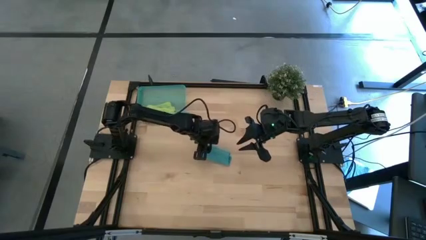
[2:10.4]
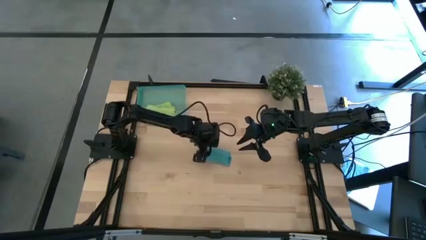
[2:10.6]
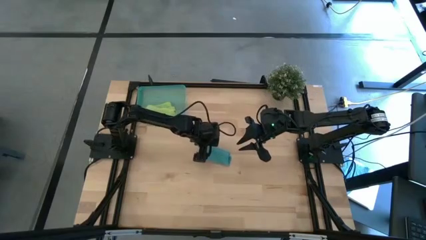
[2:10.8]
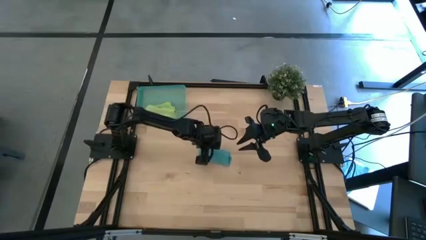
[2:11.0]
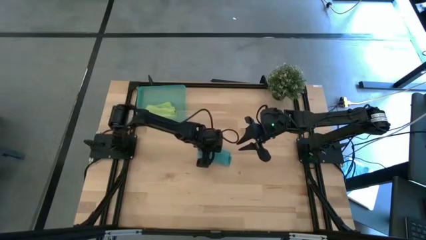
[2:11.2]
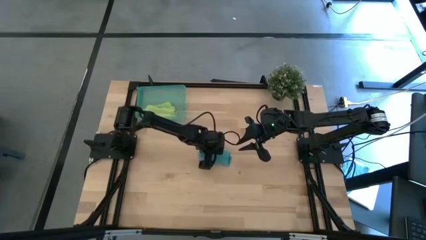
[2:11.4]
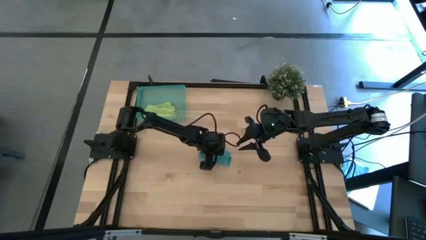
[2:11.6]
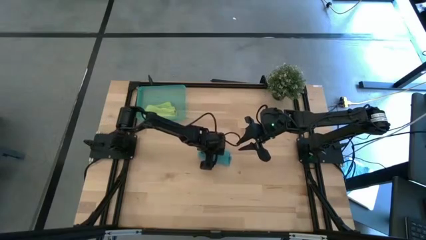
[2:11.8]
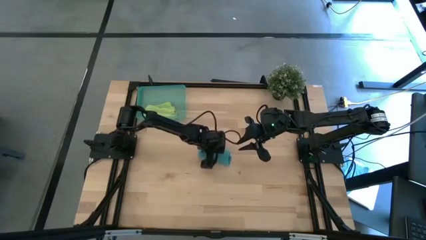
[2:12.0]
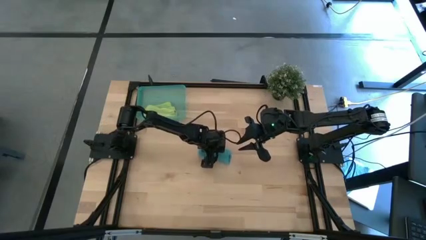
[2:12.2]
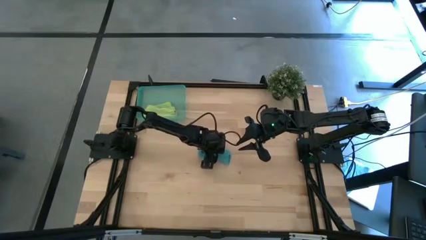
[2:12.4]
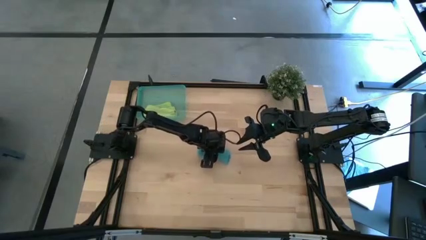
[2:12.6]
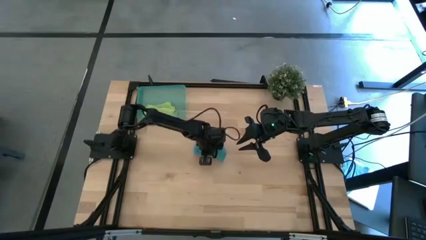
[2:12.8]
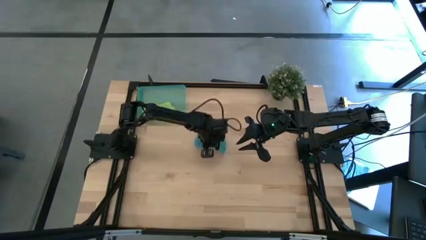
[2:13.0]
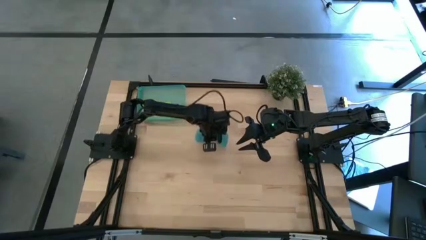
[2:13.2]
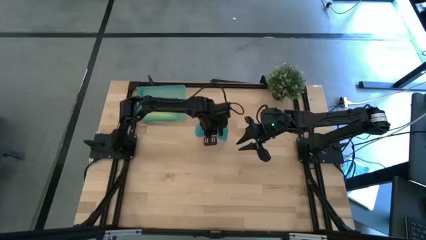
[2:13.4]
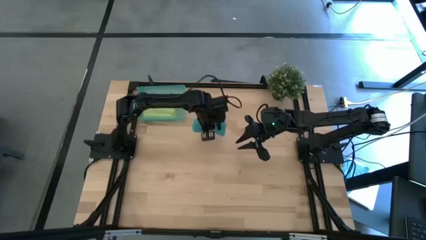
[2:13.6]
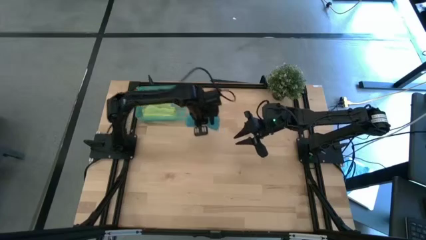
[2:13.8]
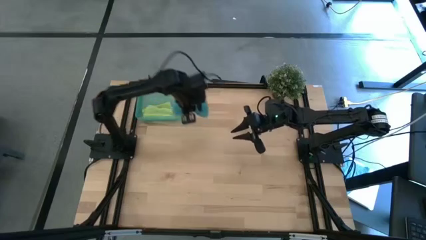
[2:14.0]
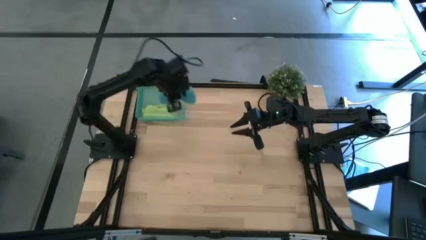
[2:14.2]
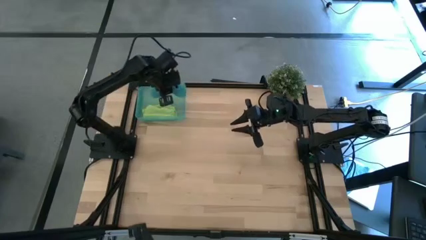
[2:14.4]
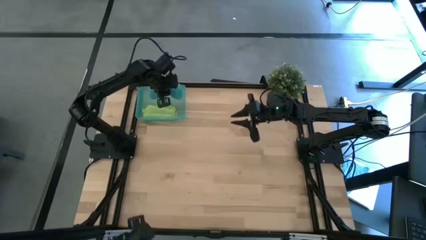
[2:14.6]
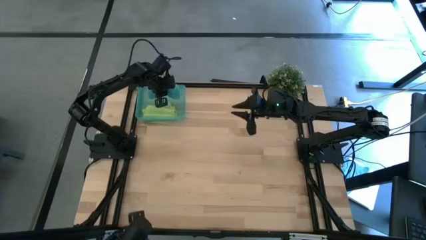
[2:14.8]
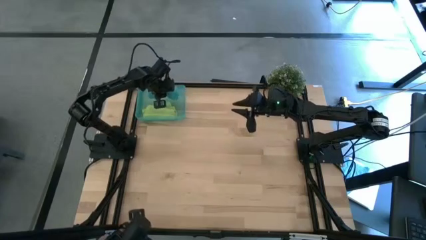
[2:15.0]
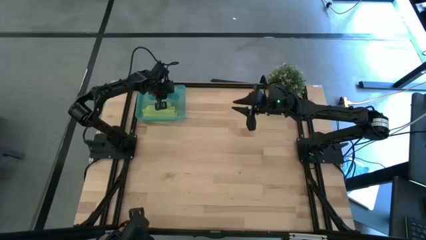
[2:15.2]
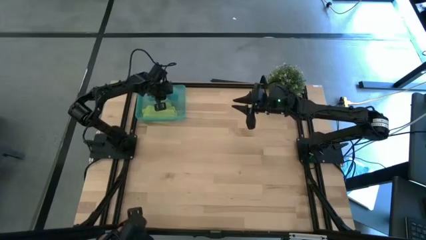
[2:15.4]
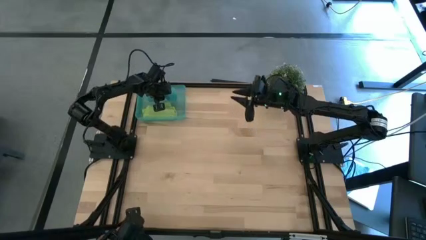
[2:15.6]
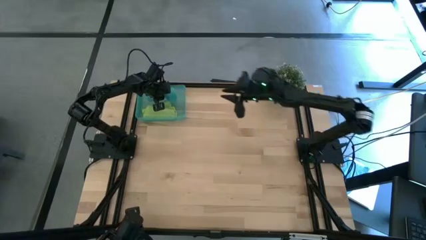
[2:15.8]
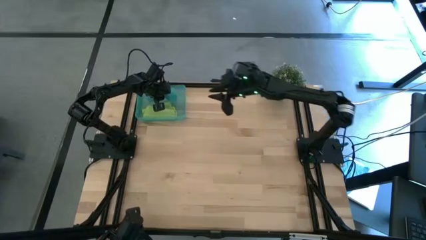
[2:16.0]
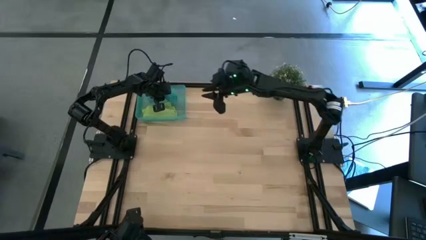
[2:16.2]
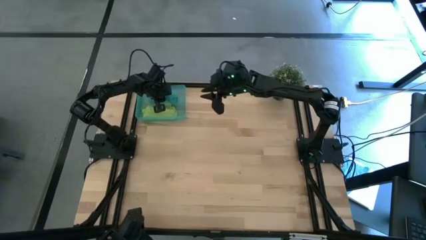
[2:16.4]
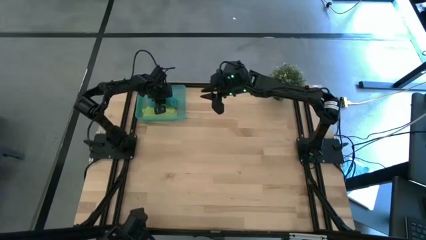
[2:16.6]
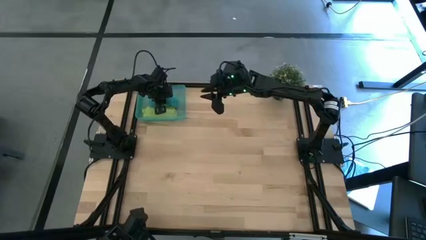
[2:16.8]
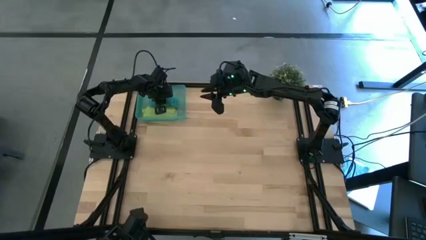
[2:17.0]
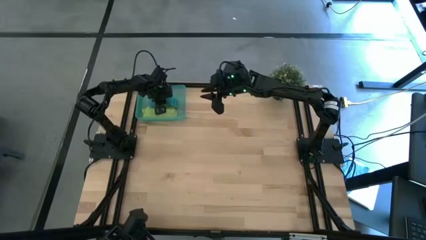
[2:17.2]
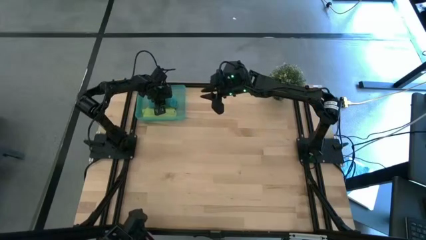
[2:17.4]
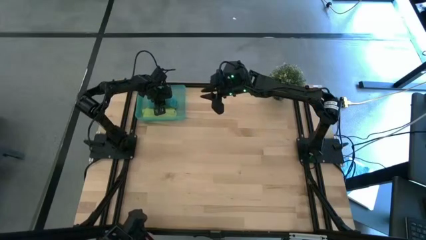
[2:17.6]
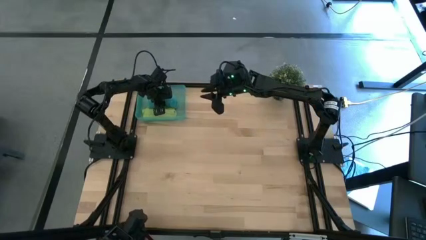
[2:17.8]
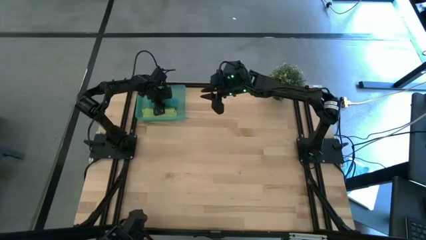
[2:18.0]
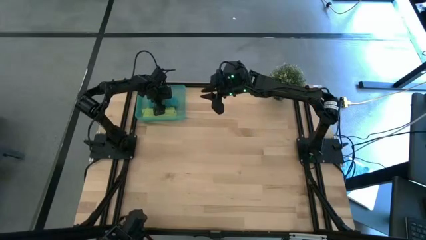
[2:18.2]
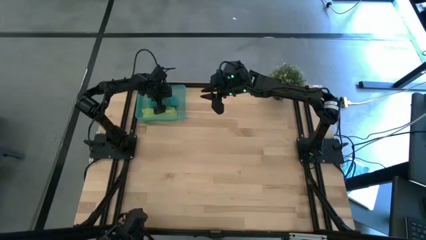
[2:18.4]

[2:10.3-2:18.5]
Task: Roll microfiber towels into tight, uniform cylinder then place into a basket
Put the blue microfiber cloth into the blue bin

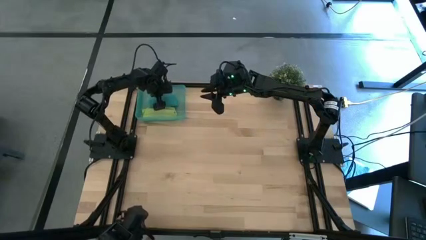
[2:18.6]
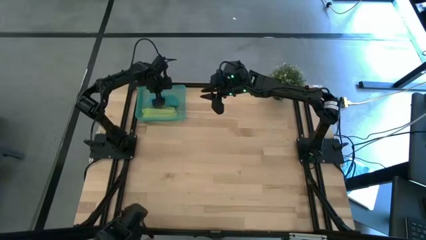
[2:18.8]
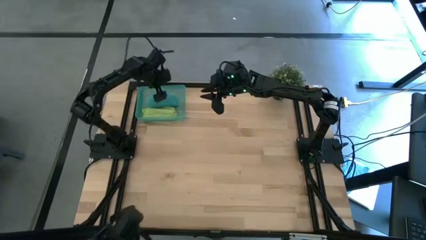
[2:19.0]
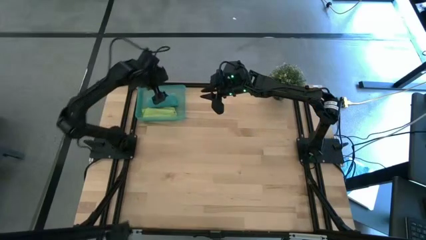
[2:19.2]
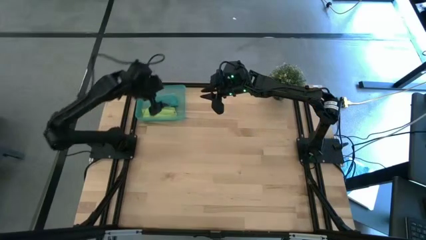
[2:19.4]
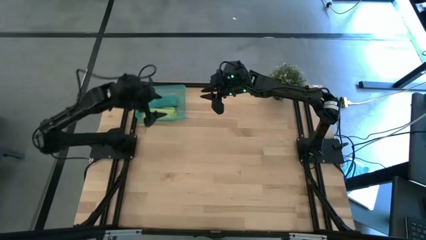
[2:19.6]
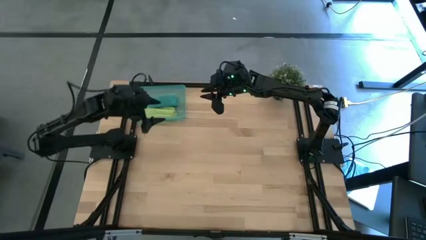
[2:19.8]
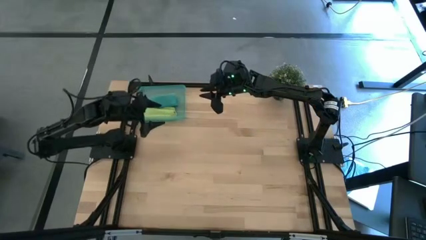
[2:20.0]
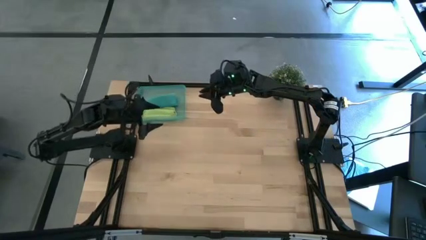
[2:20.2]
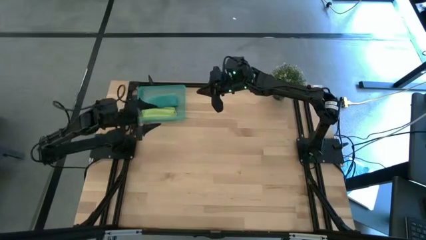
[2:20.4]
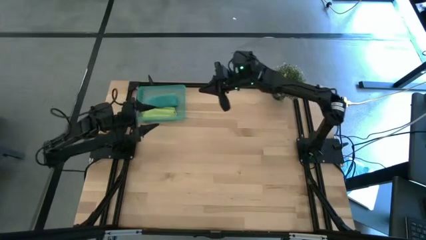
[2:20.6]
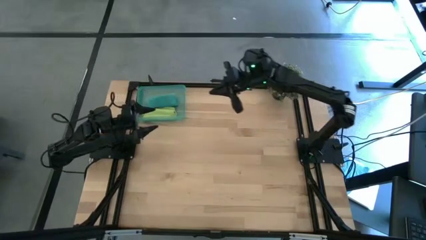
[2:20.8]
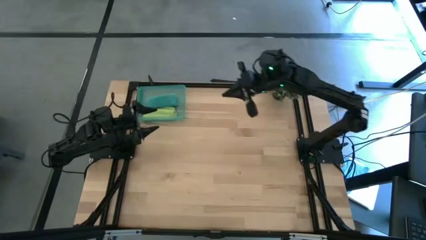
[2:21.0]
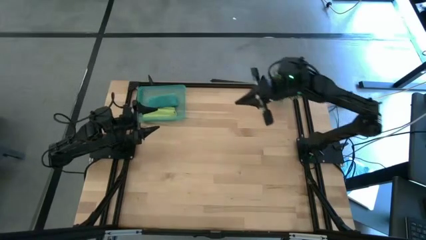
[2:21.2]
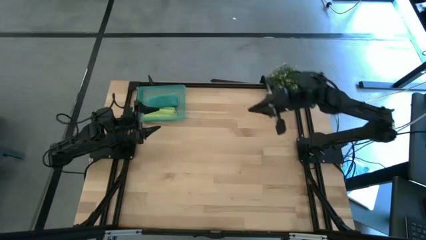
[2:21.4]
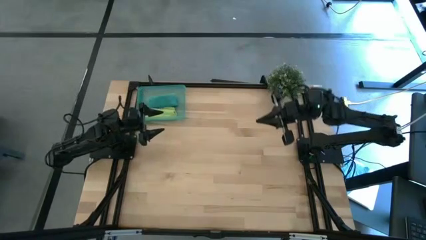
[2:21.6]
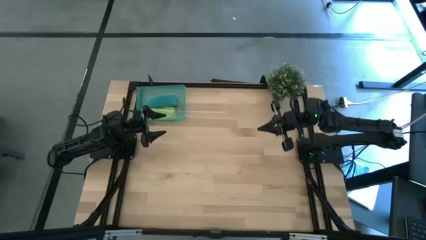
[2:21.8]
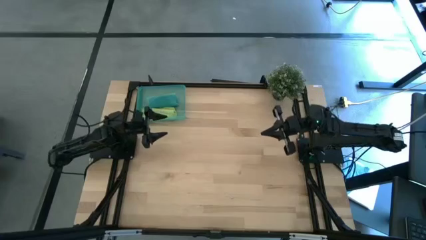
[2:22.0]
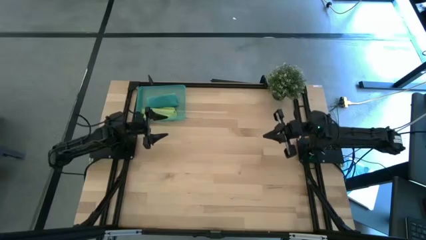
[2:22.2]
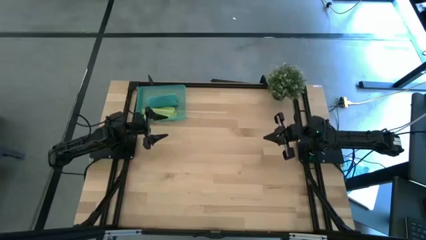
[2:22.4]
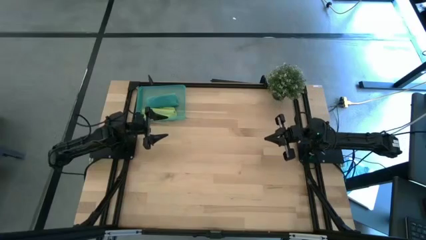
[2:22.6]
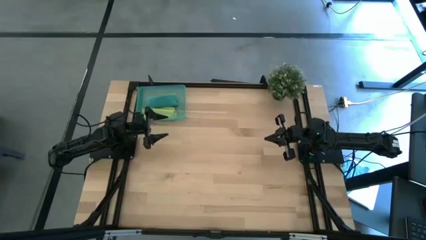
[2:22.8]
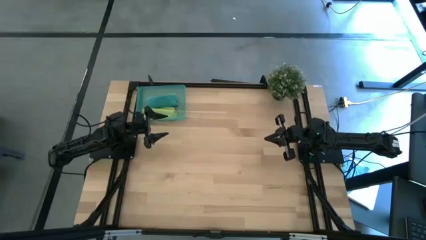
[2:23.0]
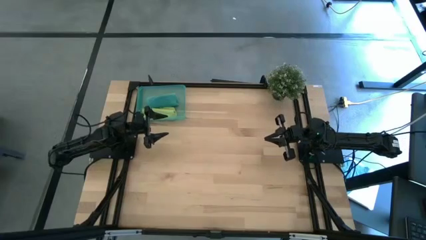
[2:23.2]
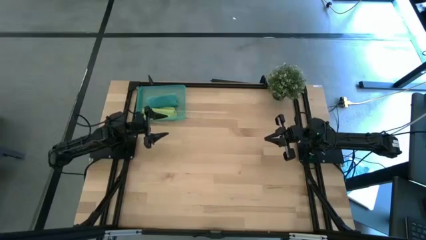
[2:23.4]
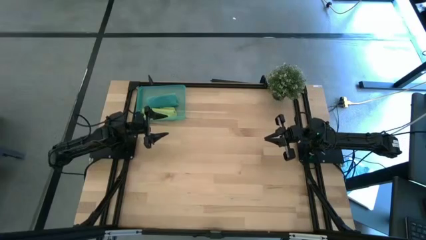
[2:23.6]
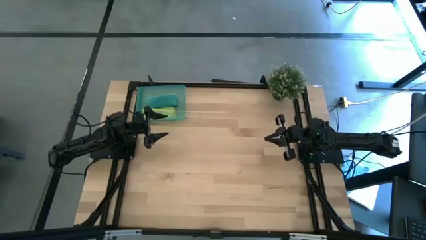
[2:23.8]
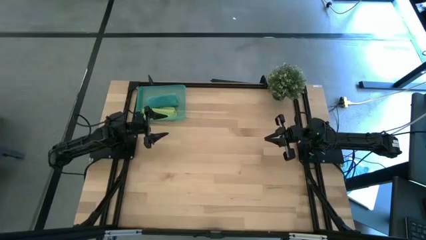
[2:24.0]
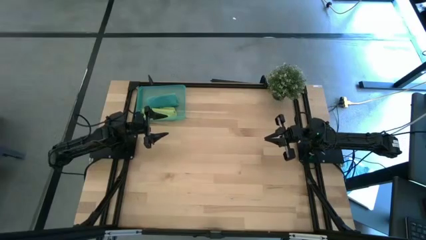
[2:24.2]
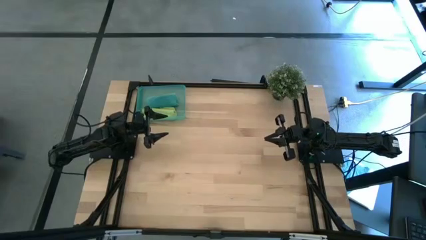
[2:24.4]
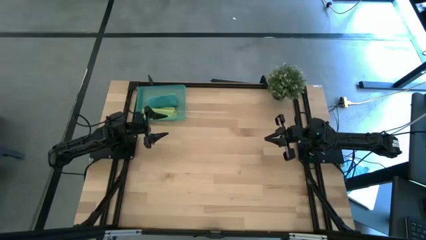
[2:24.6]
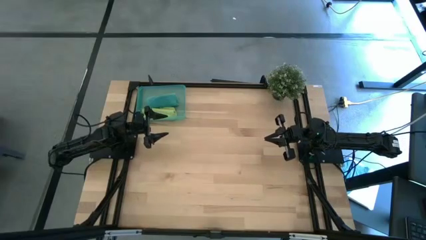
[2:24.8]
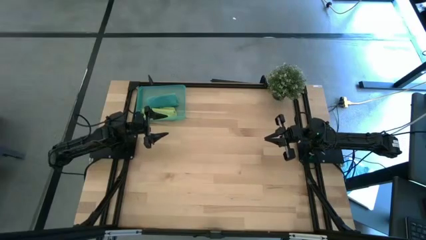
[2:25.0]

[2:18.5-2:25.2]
Return to Home Position

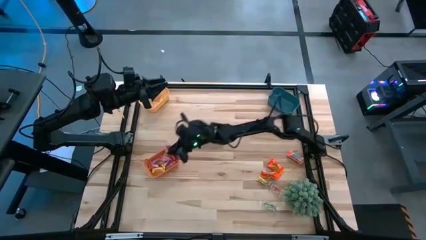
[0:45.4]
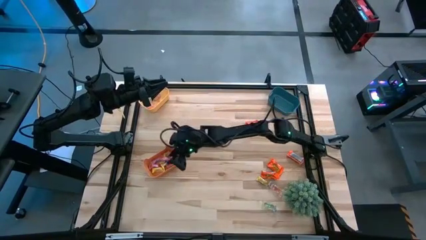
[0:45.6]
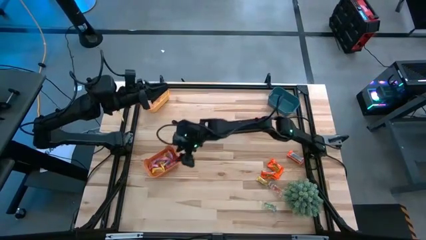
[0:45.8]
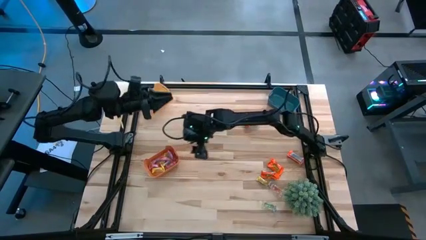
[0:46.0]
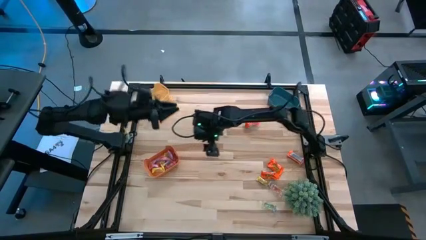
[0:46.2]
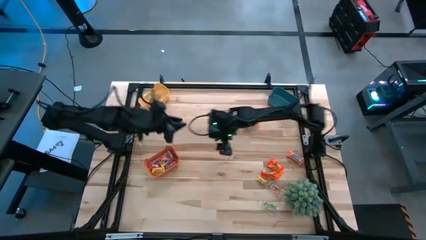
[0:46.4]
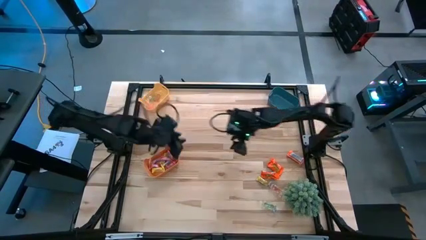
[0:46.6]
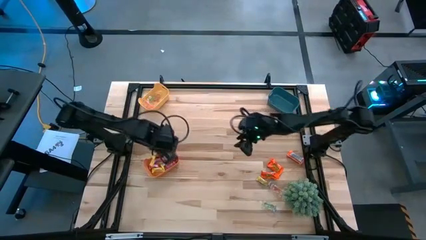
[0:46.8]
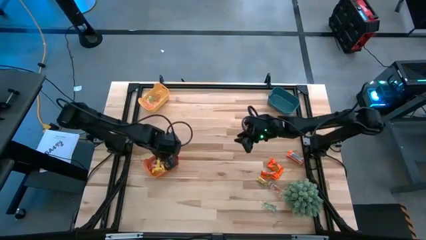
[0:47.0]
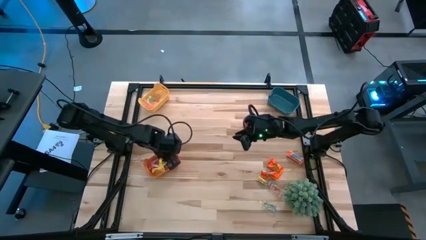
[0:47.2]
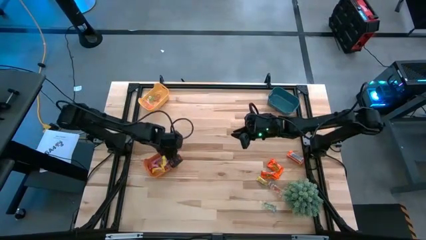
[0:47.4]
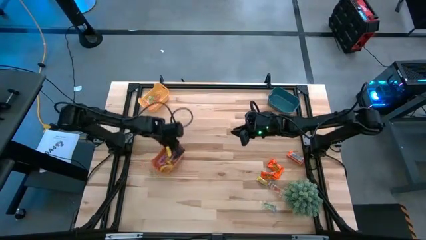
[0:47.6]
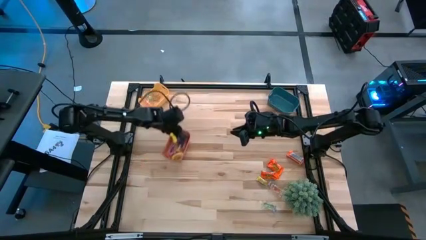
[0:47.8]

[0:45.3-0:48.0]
Task: Sort candy
Adjust the orange bin
